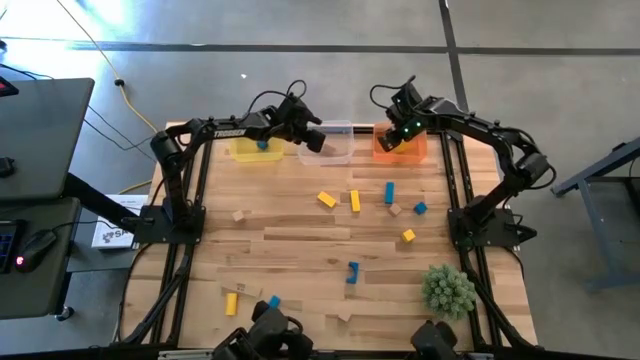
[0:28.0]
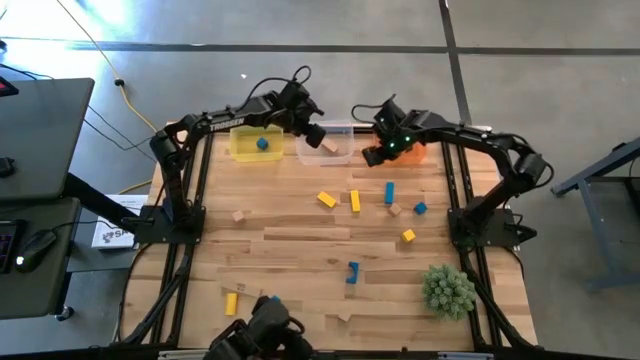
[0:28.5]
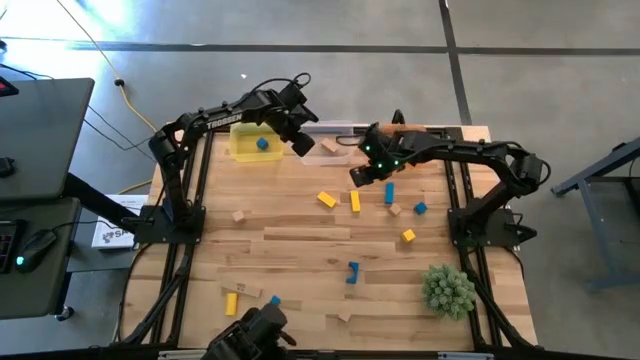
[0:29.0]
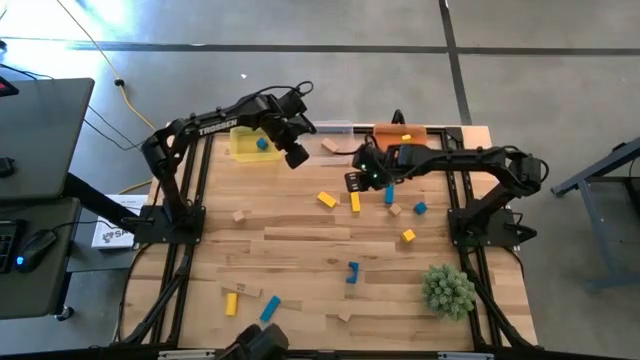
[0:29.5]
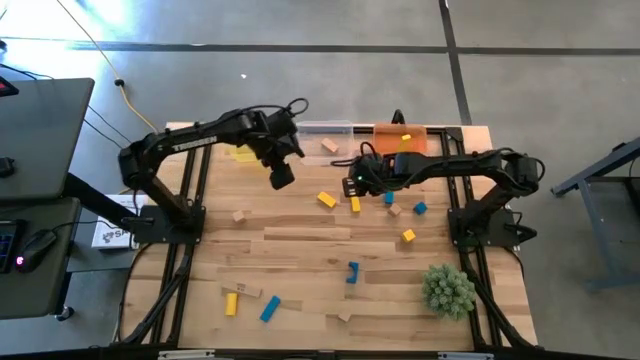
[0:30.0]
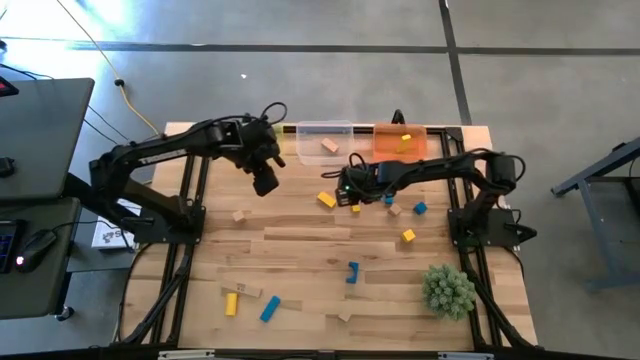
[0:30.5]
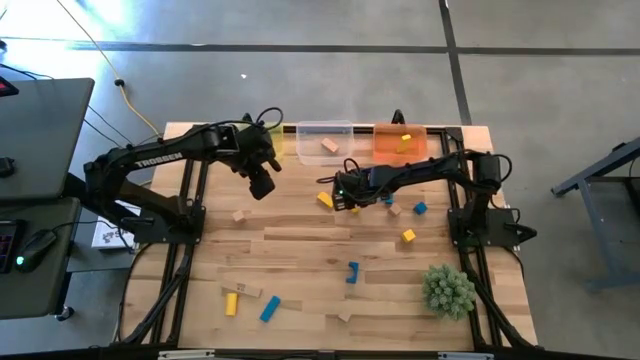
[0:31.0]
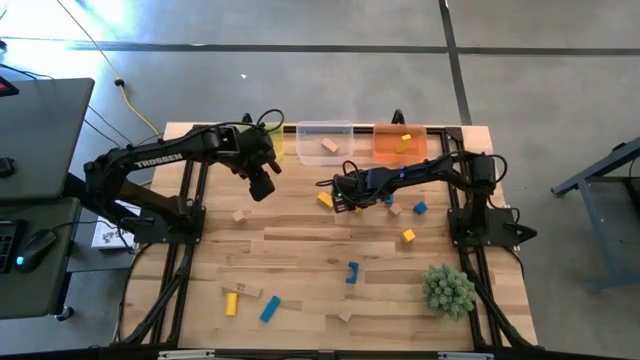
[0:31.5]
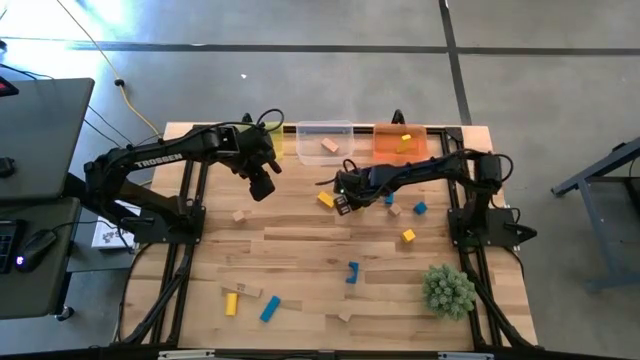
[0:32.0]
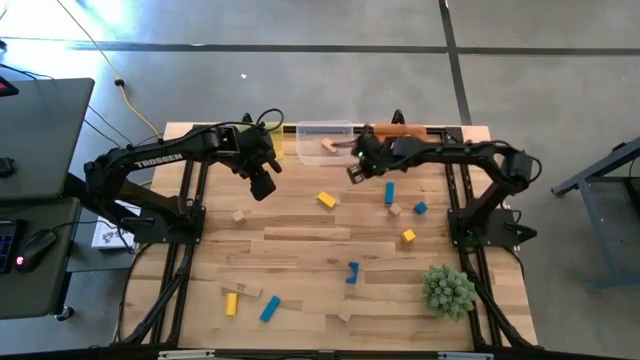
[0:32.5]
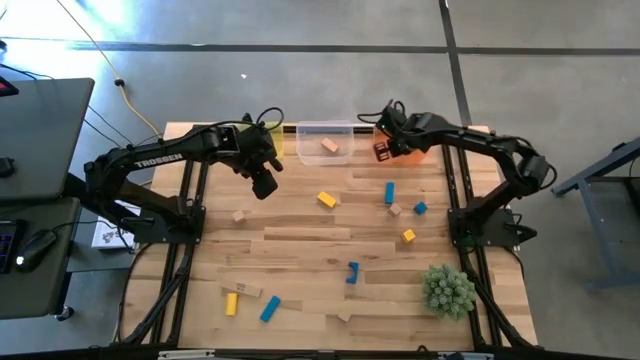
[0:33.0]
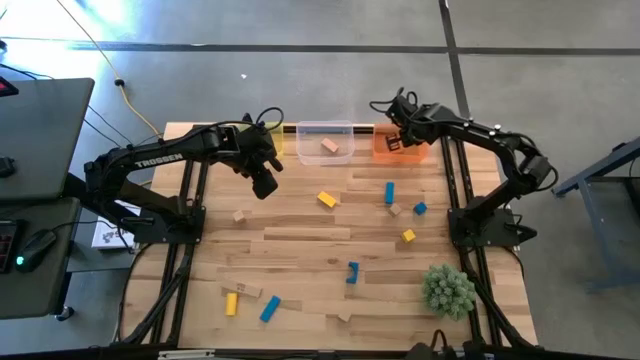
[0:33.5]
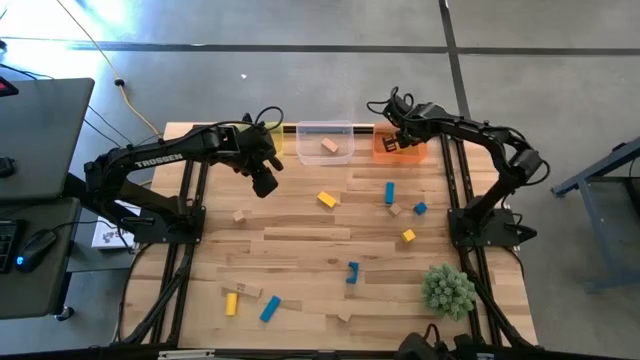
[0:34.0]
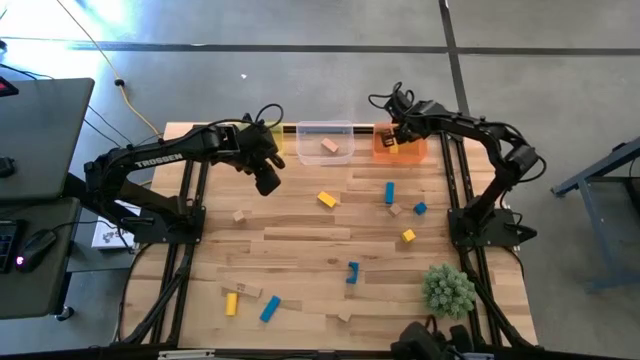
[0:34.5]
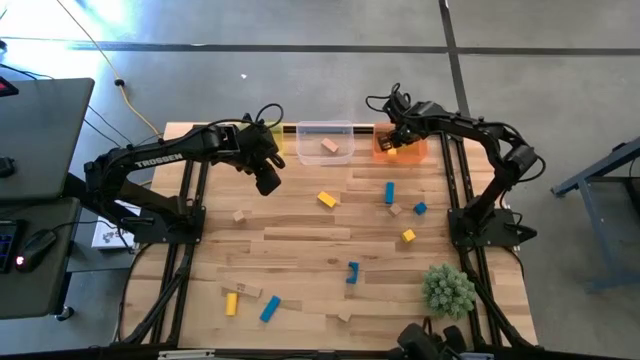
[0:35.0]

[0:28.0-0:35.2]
Task: Sort & place blocks by color
Put the yellow block into the orange bin

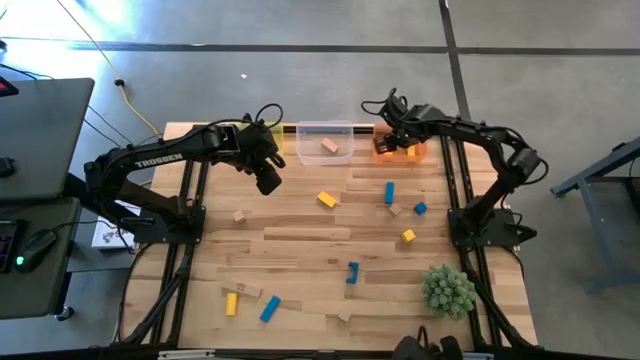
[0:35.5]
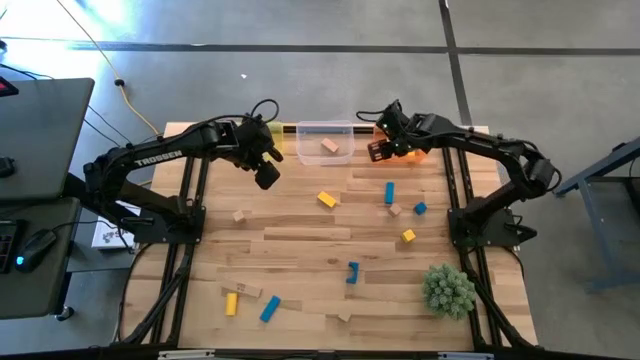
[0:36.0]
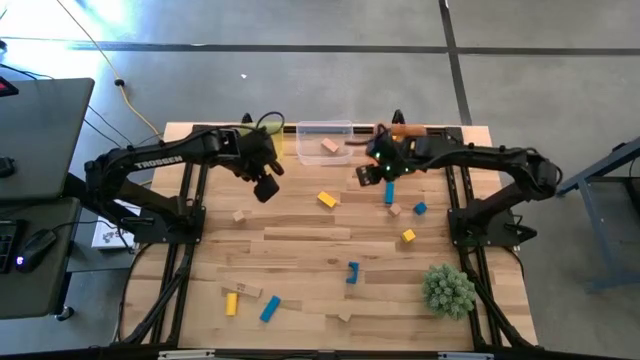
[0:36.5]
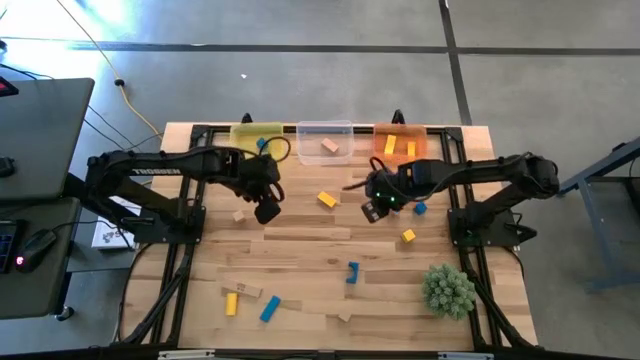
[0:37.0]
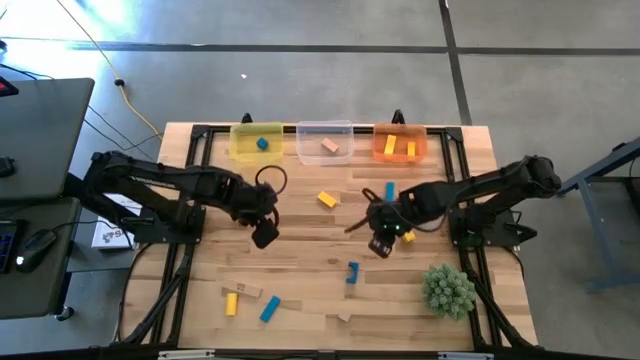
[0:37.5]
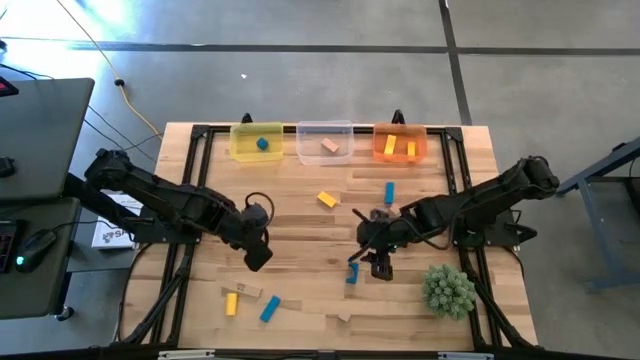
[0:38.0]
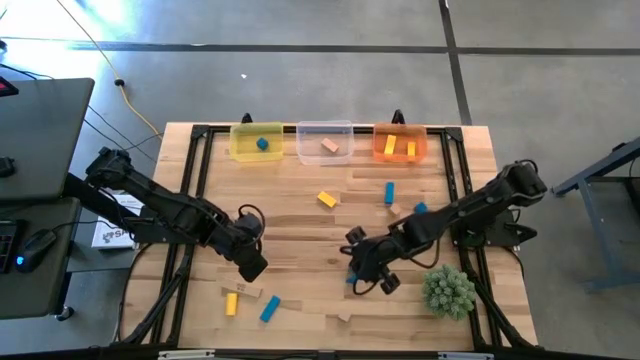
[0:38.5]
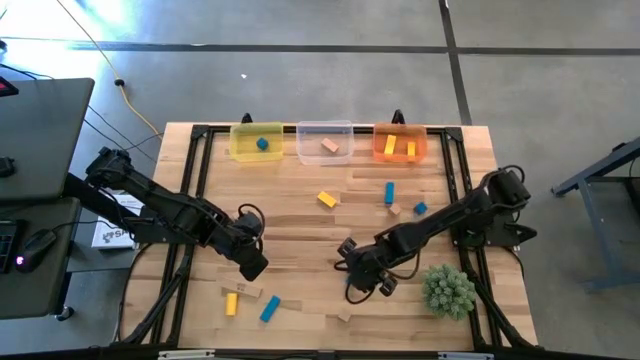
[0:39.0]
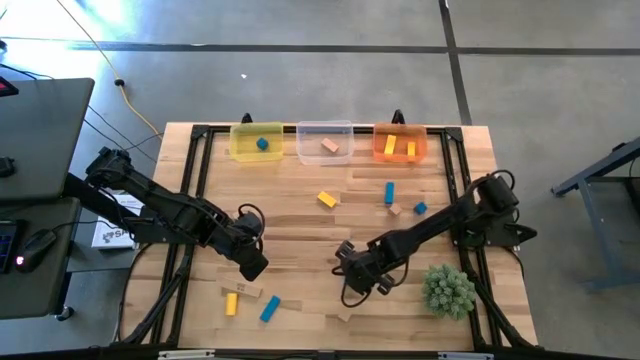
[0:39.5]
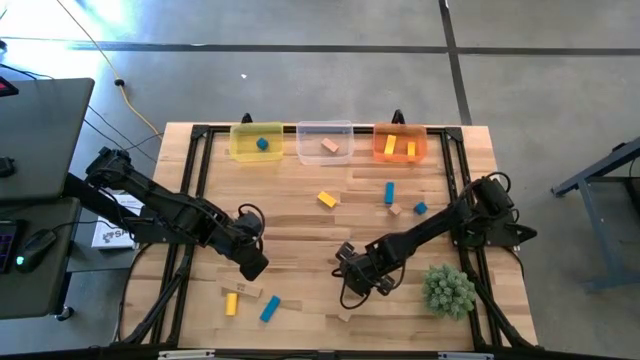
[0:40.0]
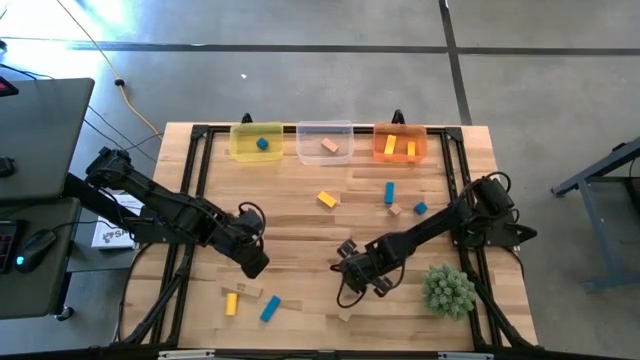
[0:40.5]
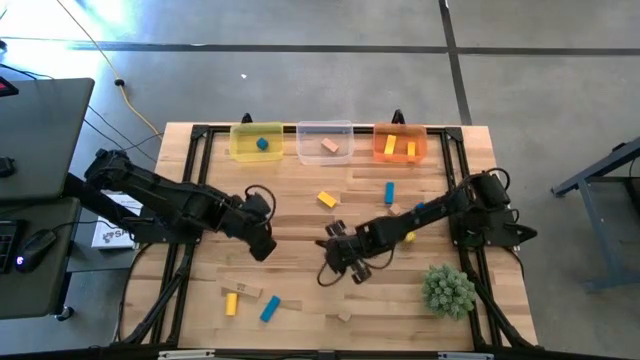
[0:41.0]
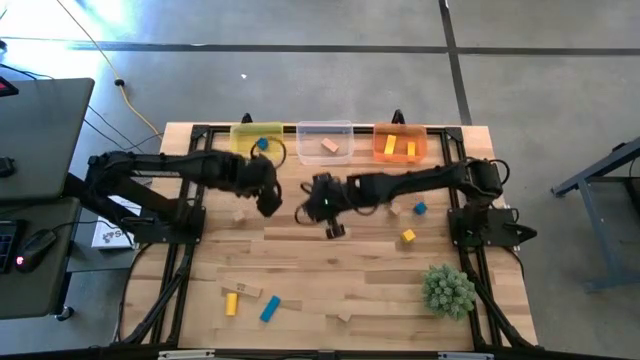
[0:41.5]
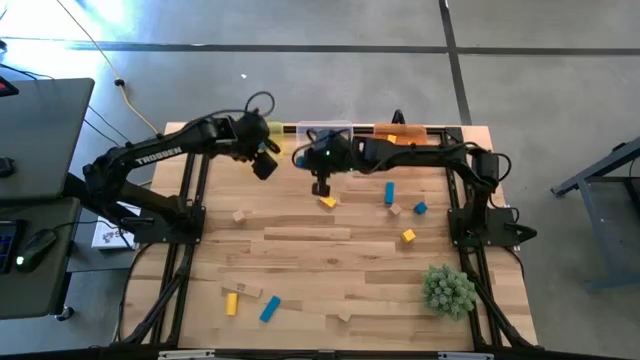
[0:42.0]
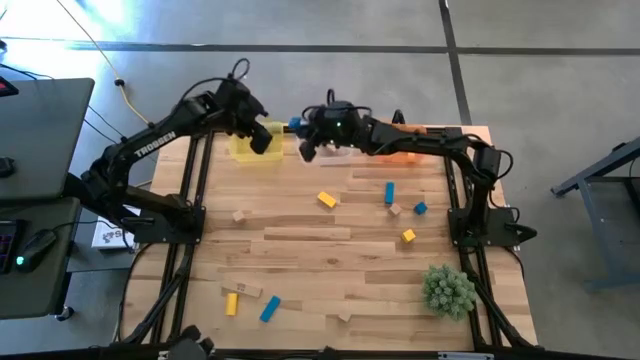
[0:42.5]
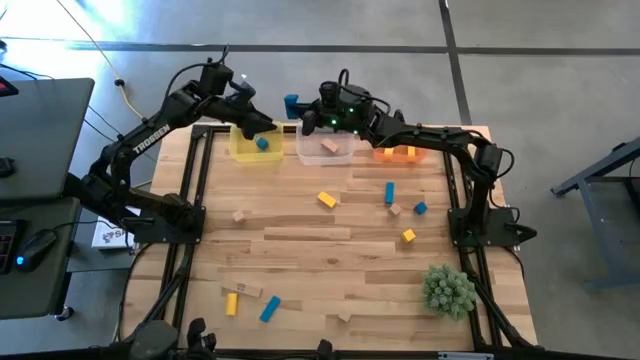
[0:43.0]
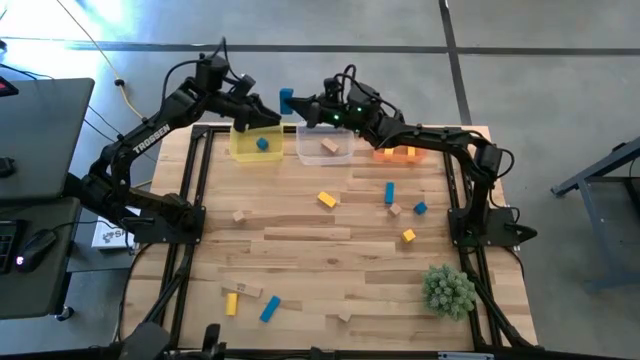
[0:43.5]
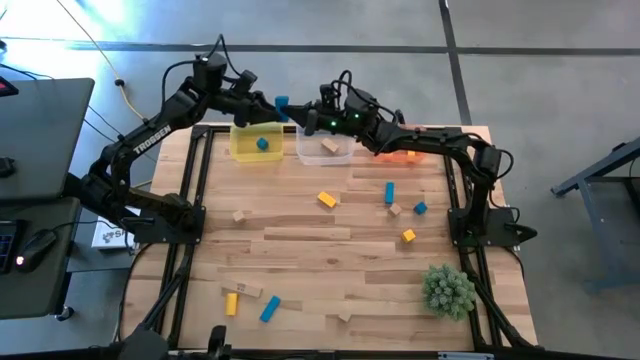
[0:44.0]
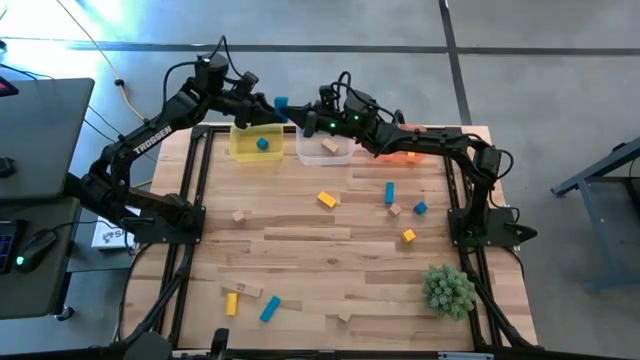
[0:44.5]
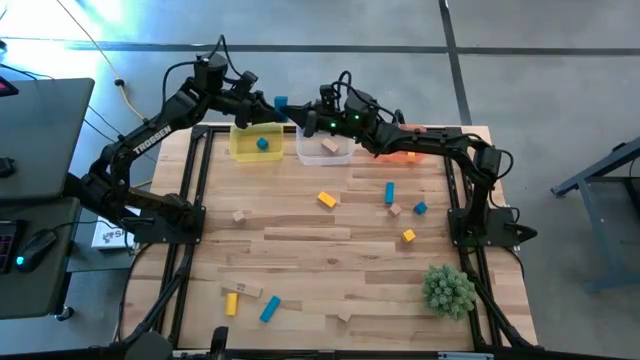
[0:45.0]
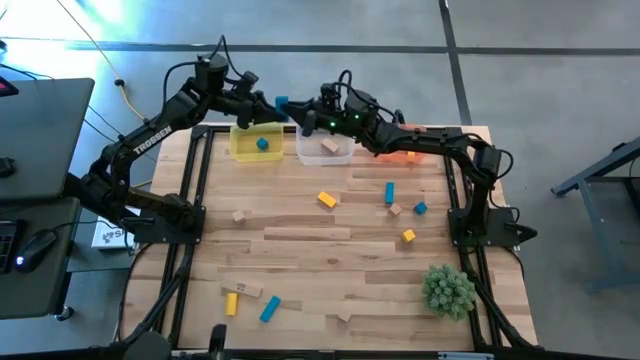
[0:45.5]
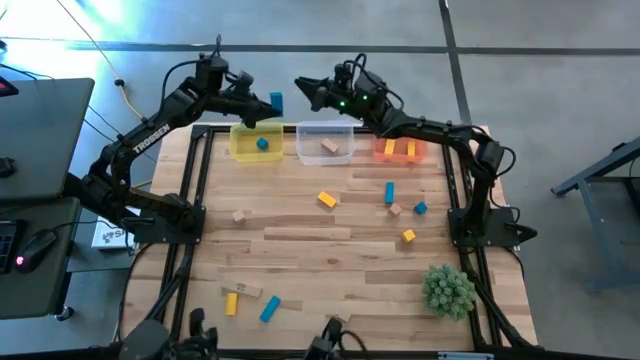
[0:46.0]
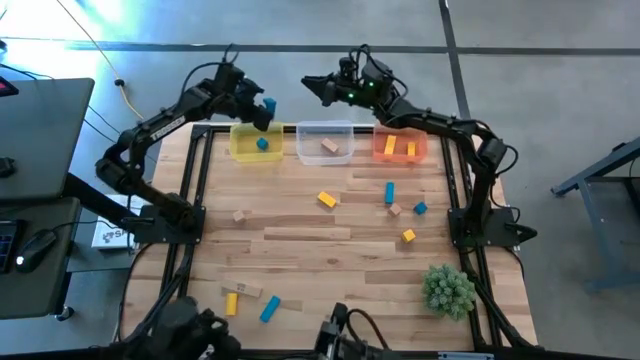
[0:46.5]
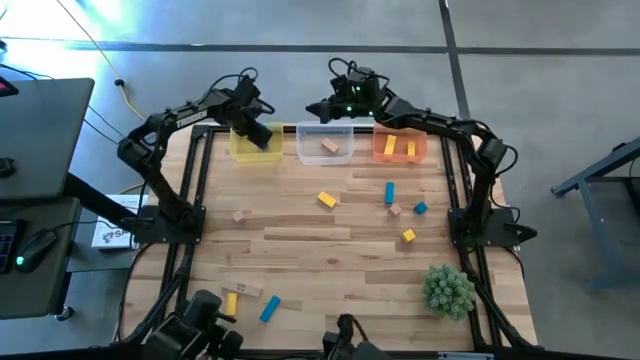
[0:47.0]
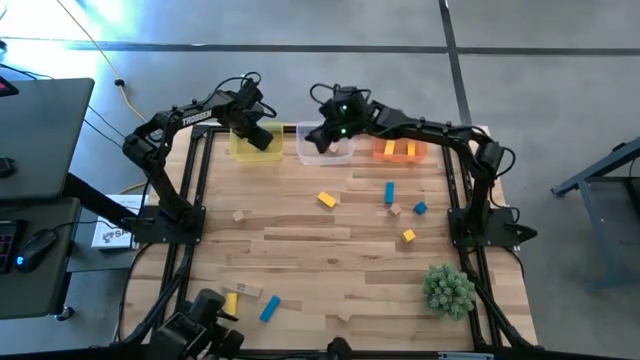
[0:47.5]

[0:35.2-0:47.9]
Put the blue block into the yellow bin

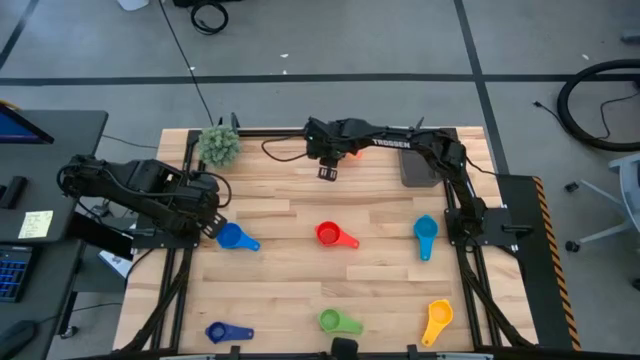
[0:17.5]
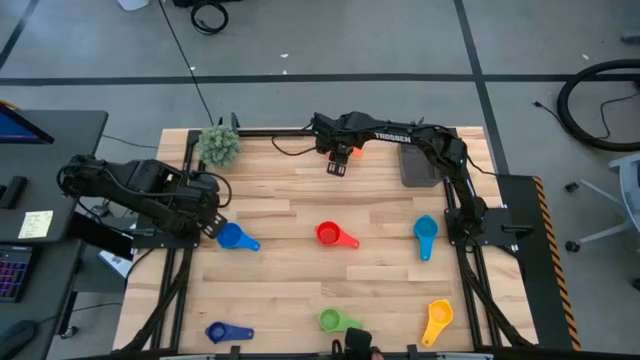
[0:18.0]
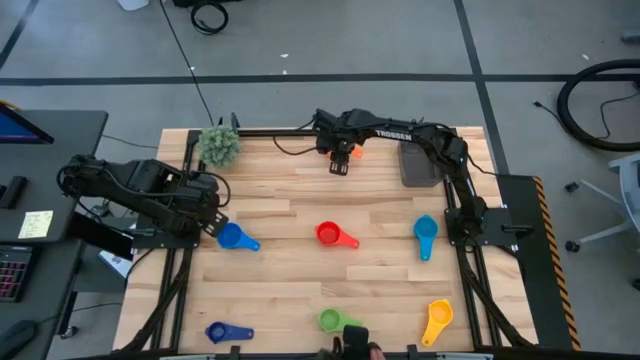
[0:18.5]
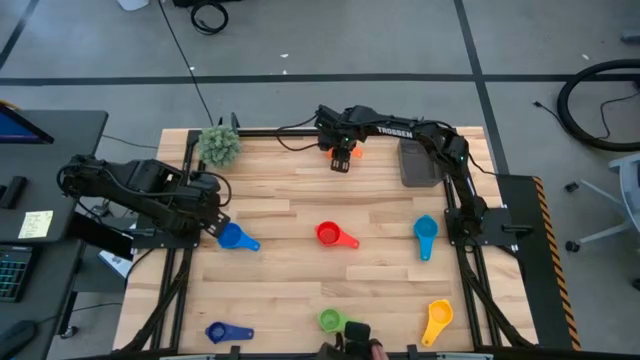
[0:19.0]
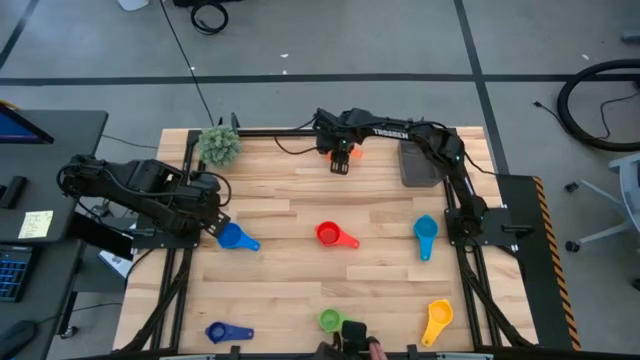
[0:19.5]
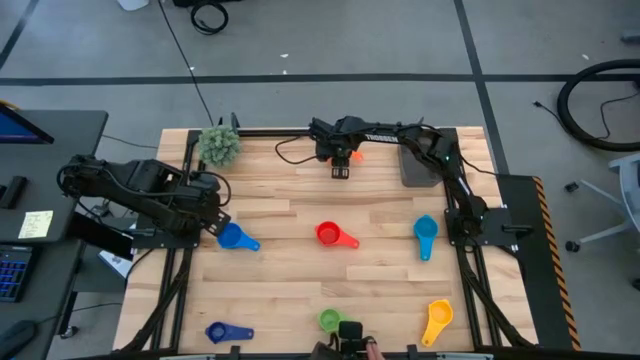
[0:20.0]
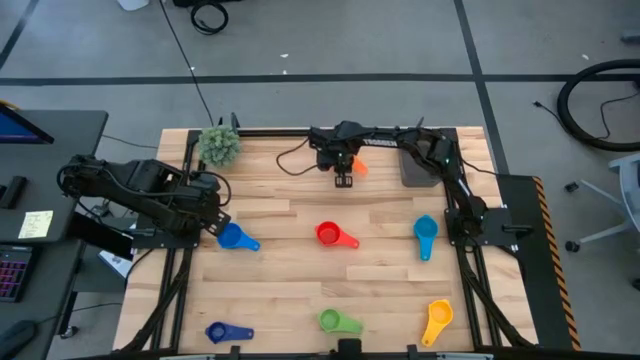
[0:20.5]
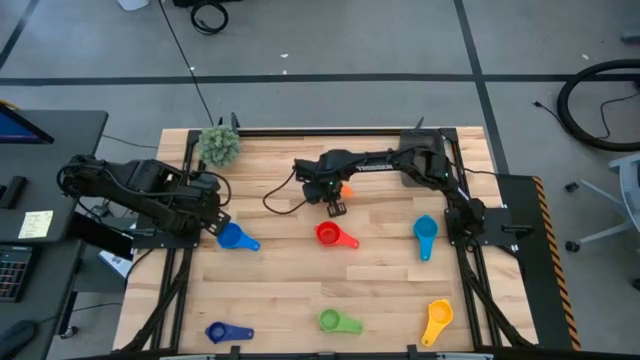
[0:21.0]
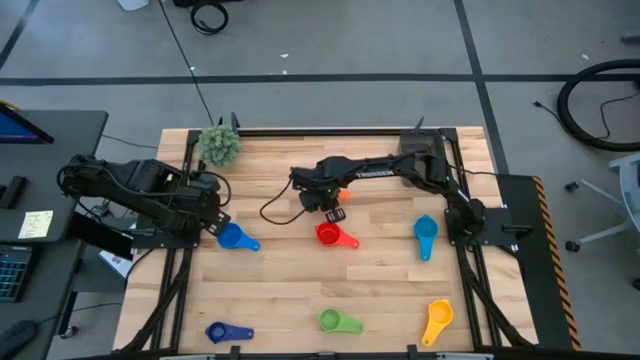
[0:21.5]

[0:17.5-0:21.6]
Task: Nest measuring cups in basket
Prepare the orange measuring cup
